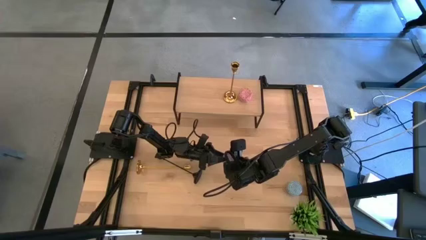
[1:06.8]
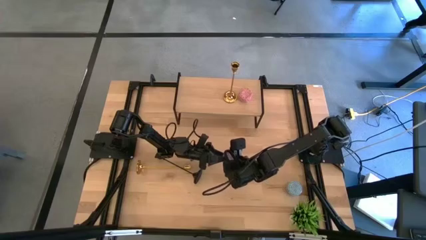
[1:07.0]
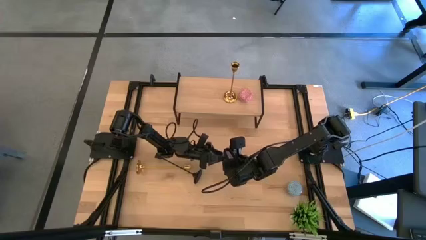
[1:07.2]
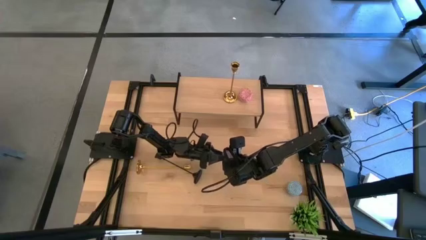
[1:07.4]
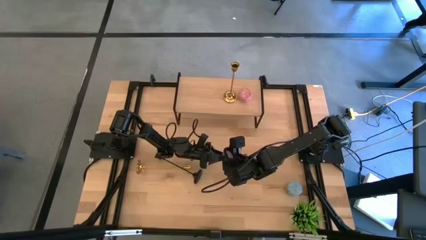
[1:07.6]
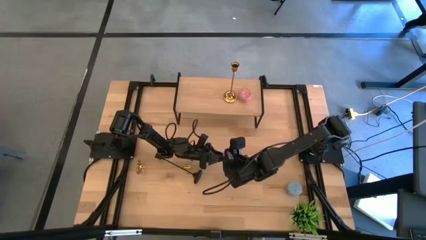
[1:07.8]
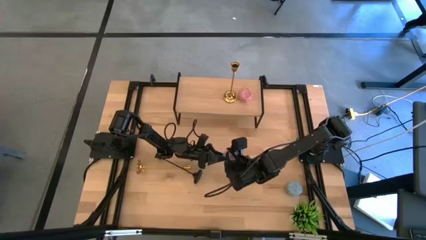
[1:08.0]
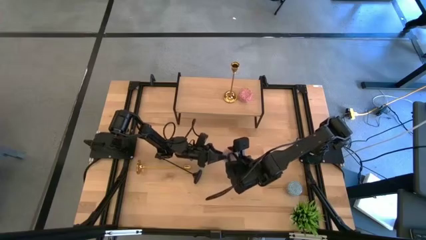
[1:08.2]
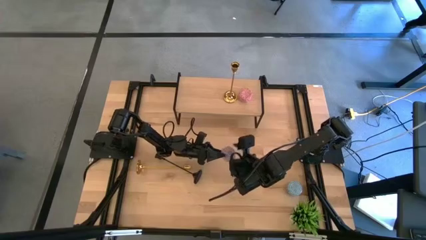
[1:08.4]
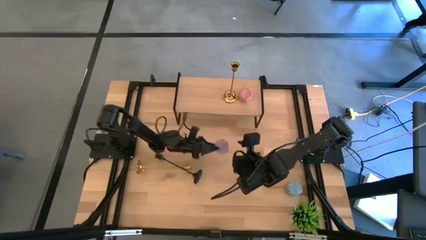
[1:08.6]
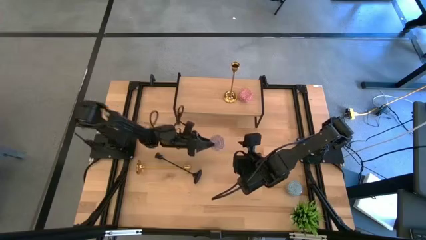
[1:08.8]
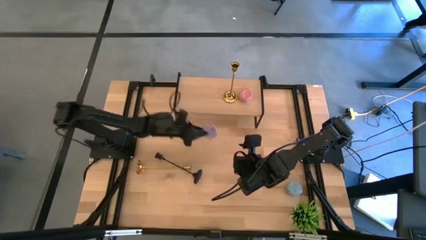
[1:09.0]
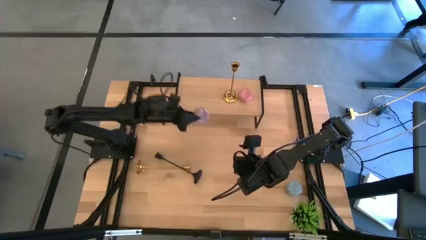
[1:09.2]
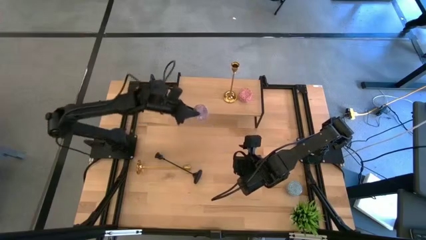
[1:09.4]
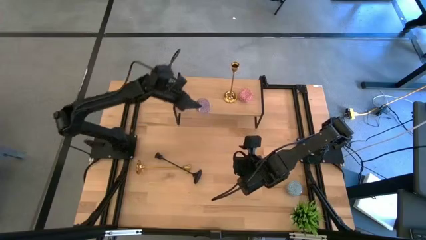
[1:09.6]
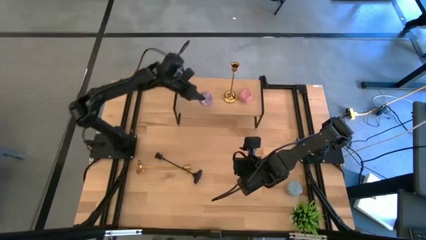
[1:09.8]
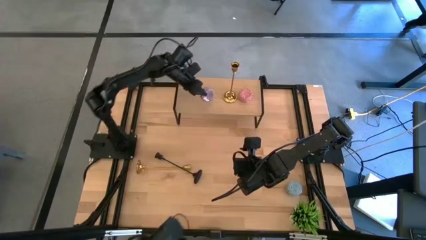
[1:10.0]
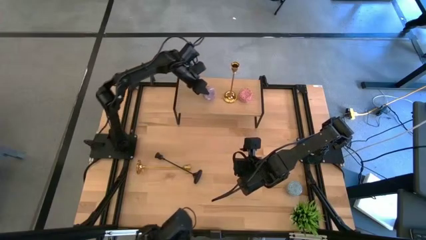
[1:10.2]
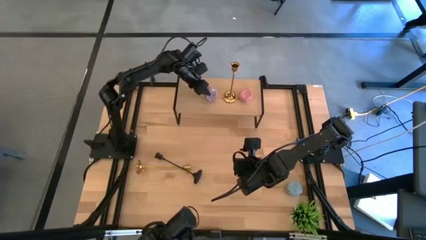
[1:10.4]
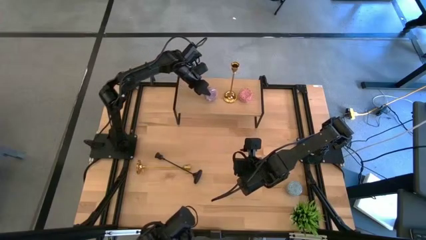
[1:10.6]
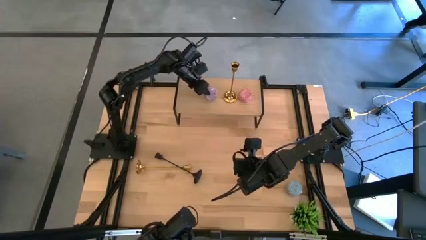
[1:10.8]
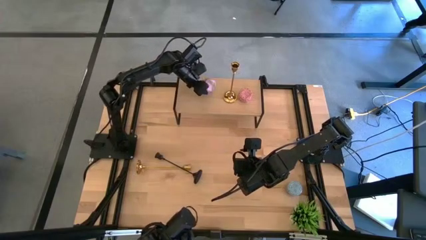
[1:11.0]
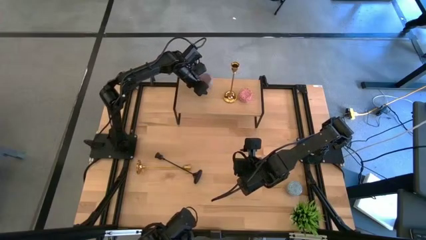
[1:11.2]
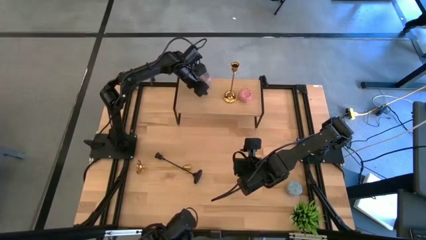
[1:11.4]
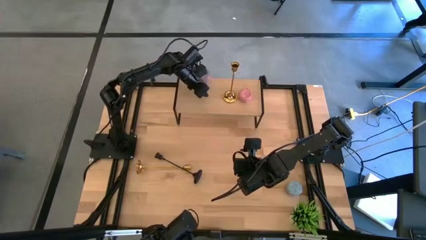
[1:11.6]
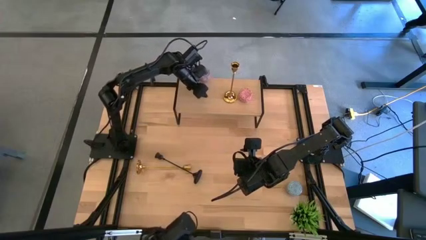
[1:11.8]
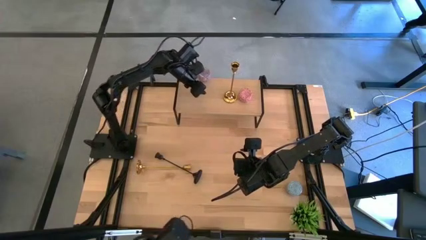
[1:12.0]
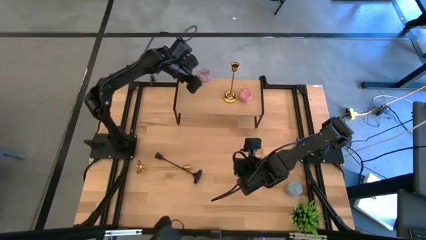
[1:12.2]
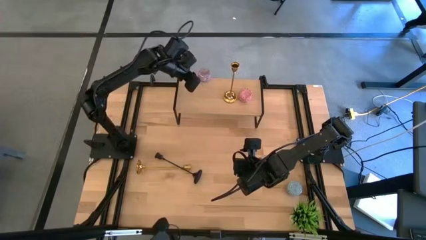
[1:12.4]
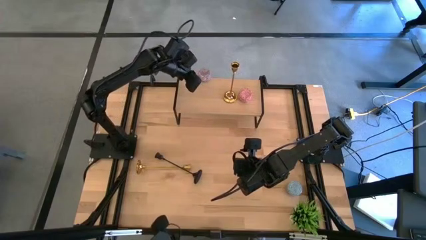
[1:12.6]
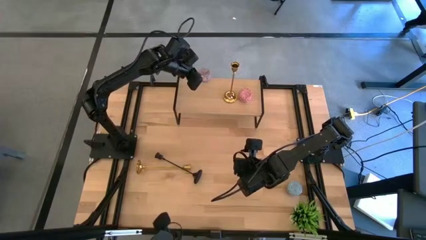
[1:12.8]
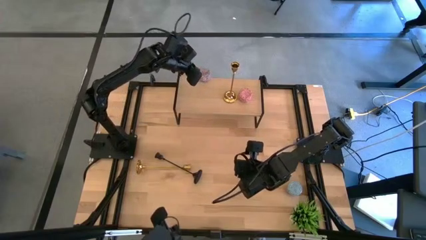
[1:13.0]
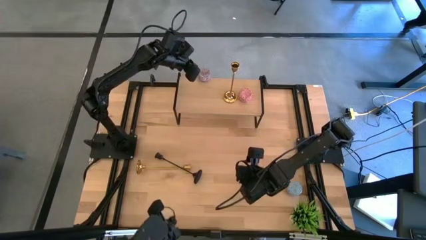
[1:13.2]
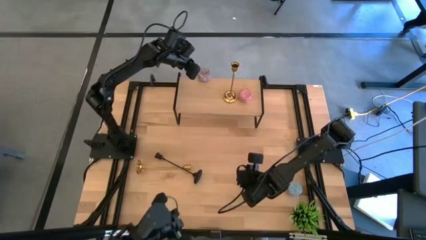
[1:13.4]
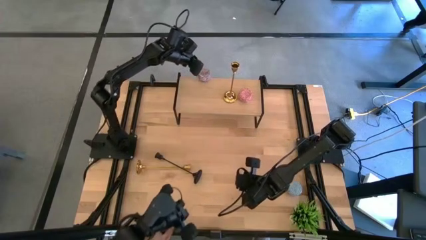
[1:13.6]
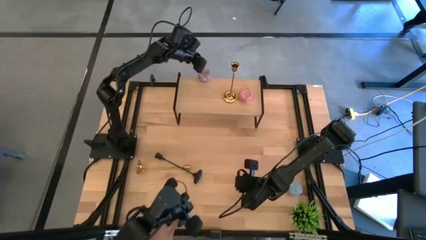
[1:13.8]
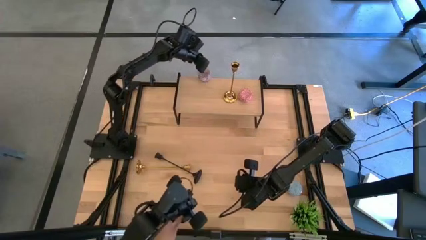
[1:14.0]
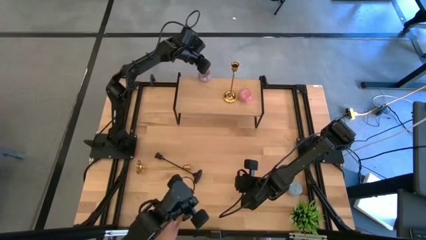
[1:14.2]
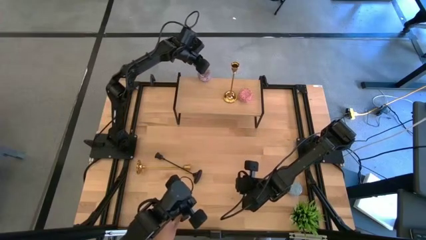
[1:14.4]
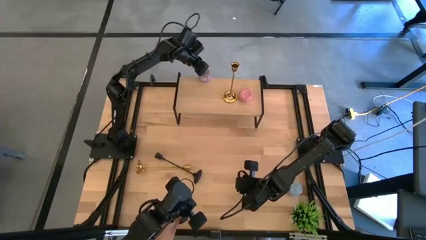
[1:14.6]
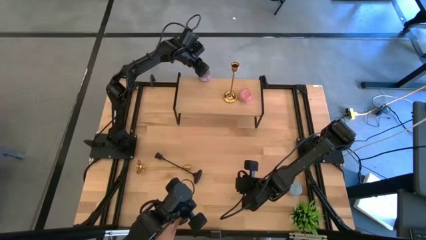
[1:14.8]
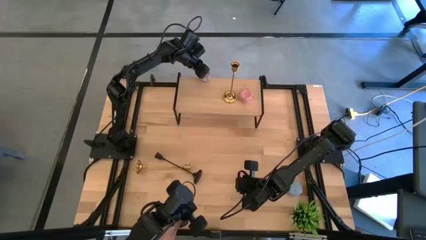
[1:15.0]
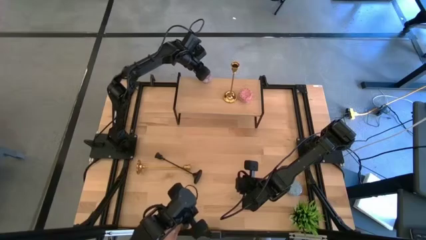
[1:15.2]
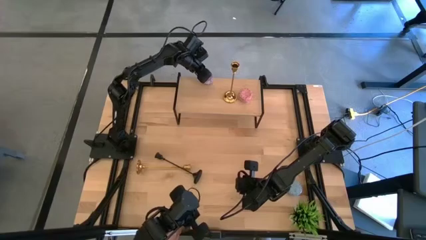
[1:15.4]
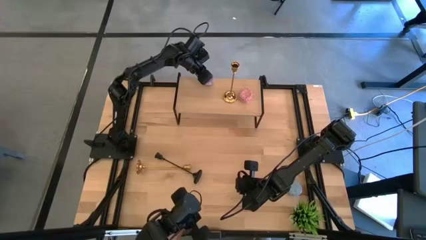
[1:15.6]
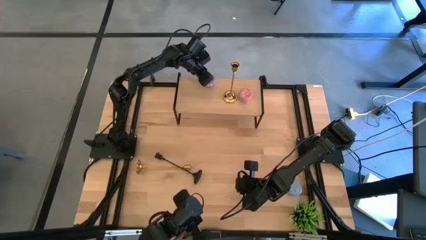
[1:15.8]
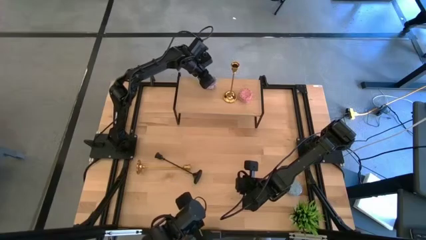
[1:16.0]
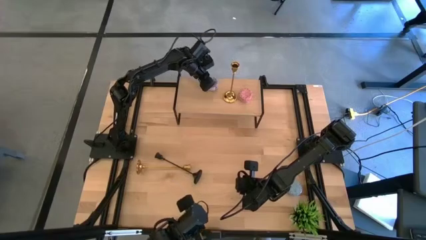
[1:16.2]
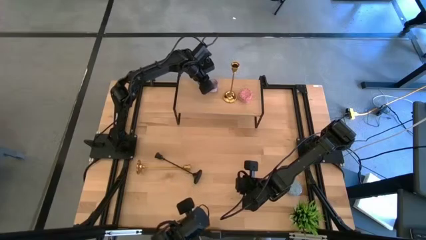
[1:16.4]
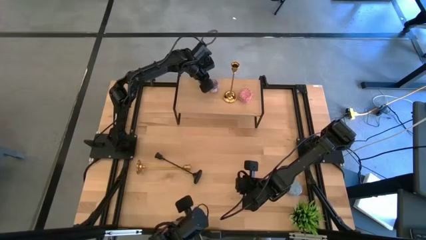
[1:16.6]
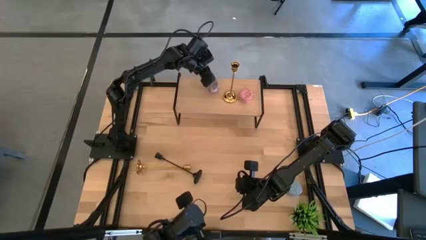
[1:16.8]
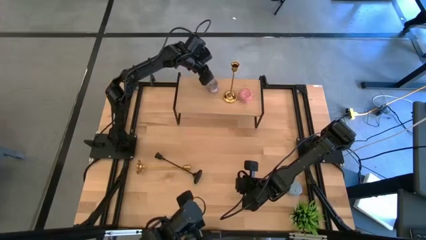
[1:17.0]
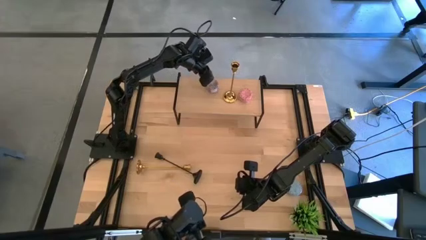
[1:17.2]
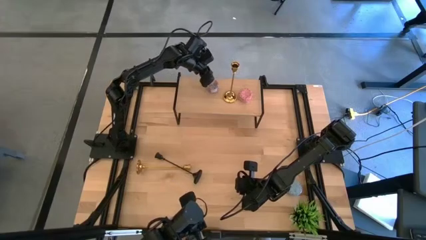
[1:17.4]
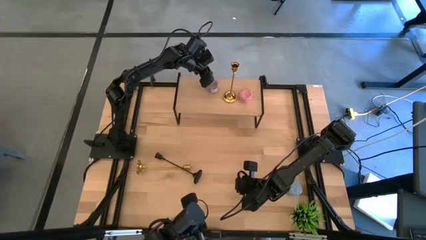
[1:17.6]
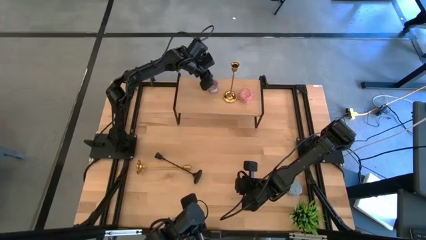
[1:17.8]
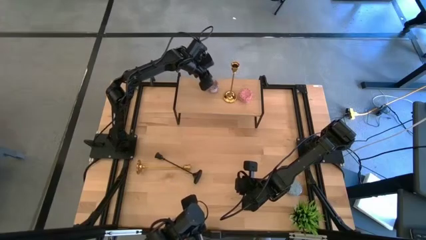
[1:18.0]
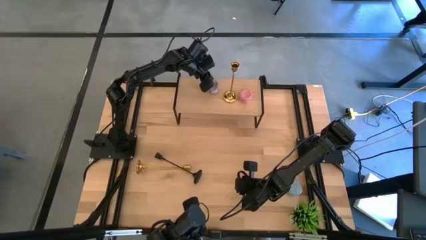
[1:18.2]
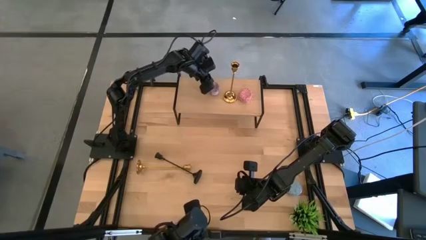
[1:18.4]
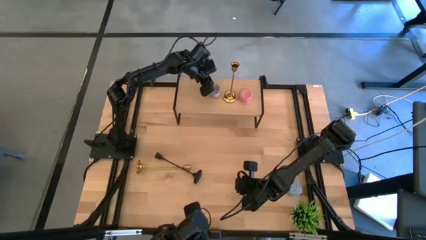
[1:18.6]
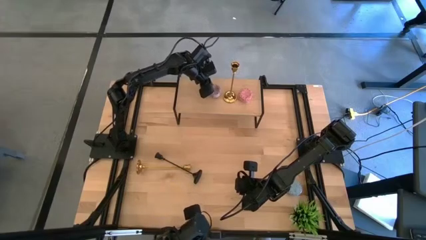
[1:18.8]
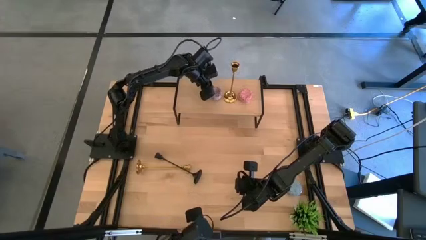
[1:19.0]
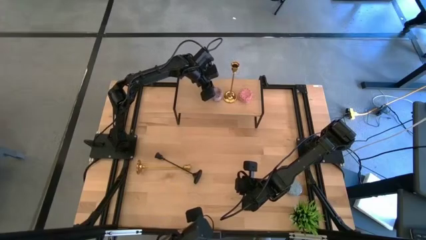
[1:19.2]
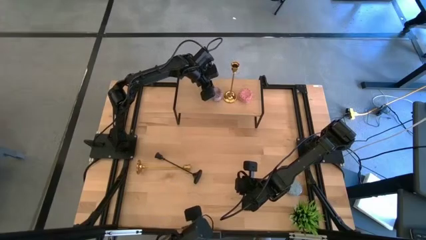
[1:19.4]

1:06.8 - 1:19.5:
Task: Pick & Place candle stick holders
Put the red scented candle on the shelf

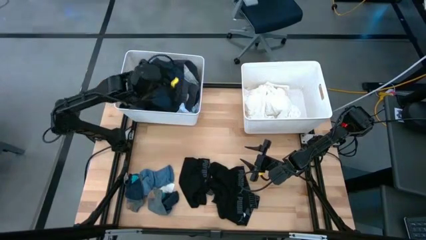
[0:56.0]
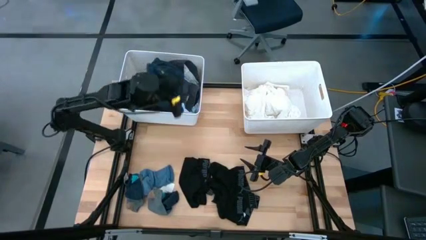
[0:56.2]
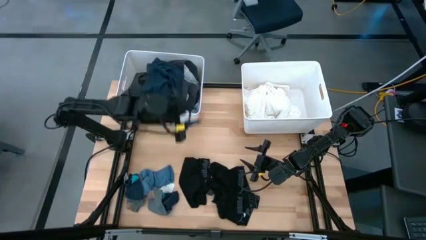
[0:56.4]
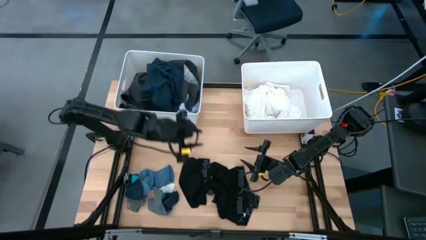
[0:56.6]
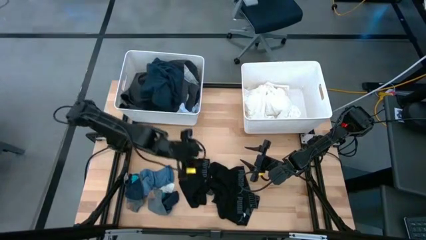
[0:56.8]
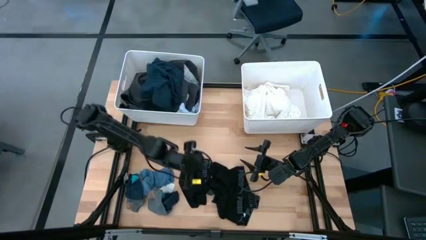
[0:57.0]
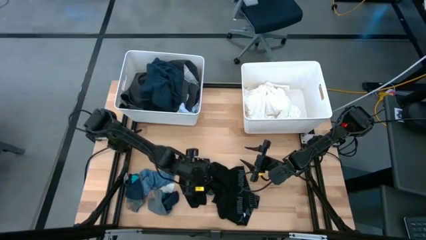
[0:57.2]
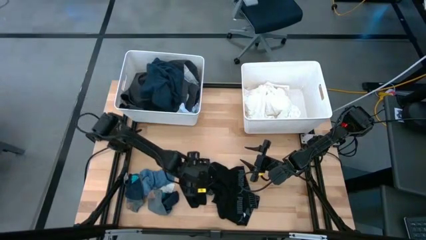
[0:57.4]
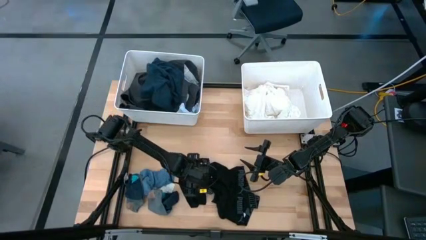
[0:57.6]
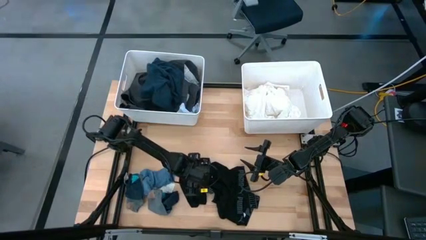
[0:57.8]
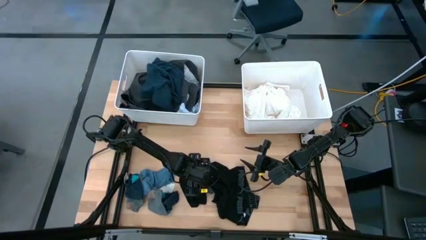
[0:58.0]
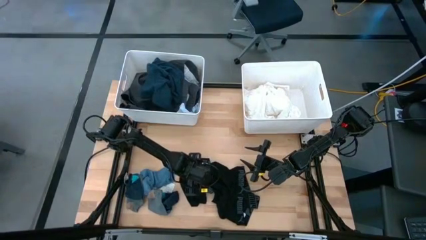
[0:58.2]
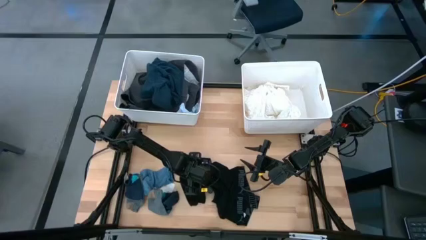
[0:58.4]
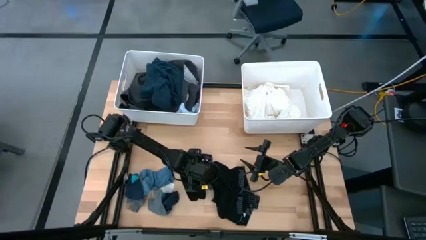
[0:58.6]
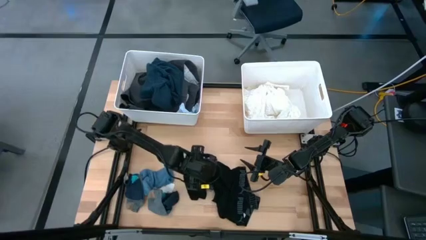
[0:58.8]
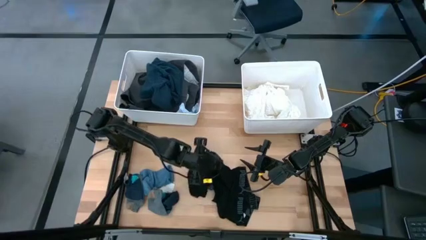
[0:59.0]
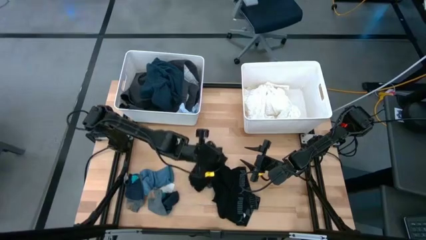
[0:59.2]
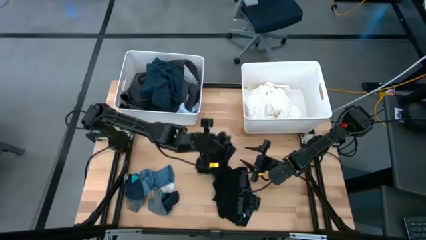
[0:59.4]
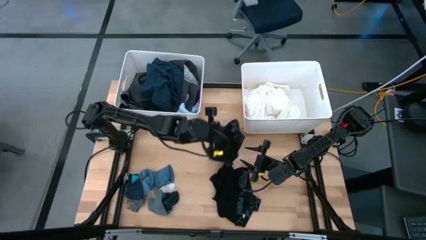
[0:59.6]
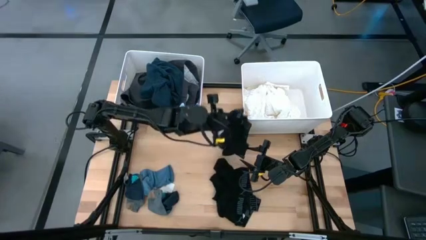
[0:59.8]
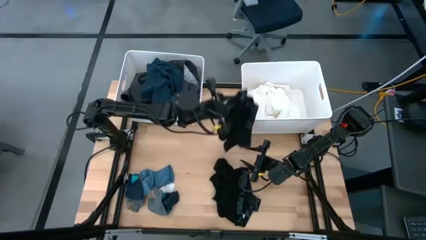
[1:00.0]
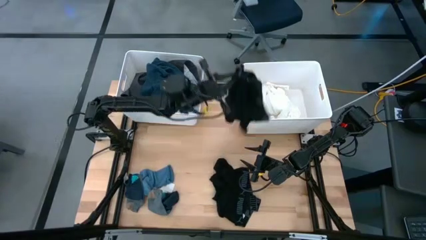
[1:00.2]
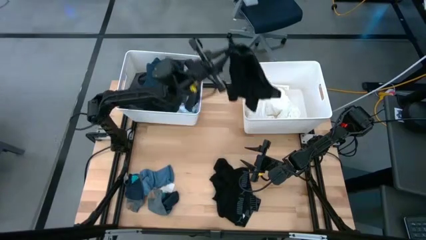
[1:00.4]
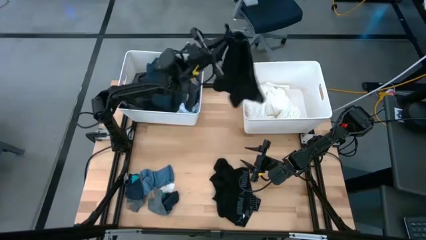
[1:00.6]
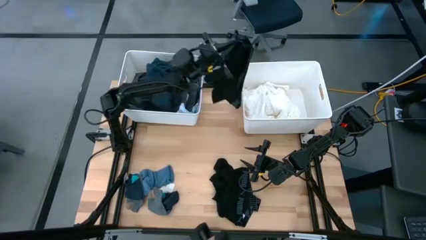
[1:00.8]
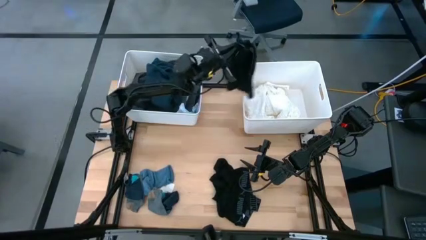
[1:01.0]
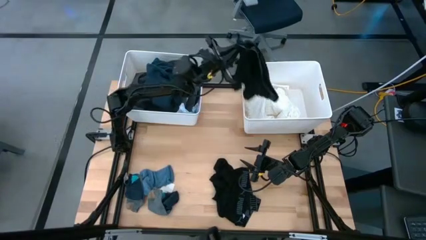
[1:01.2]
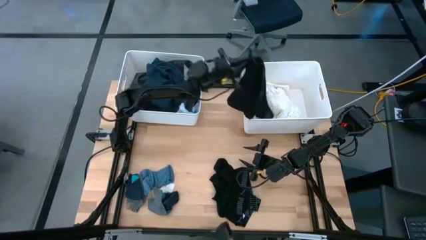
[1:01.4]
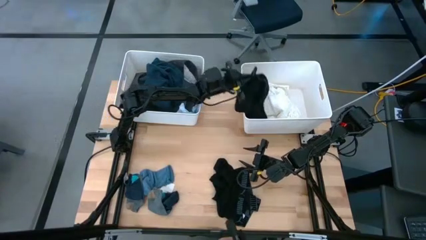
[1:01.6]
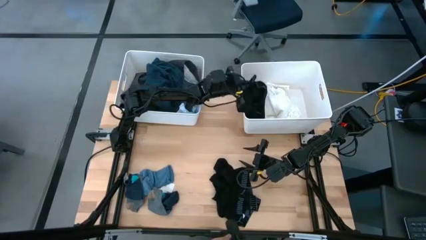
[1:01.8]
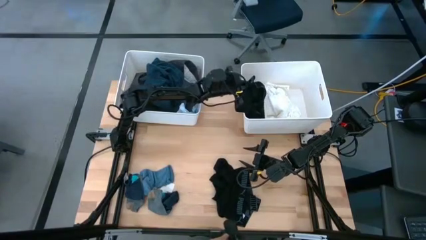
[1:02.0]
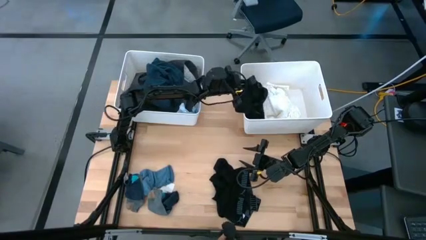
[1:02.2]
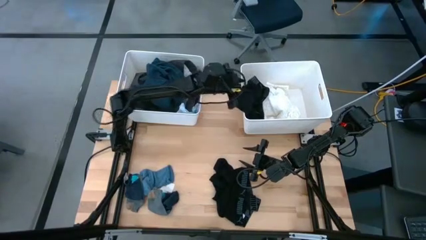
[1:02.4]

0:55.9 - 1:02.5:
Task: Sort clothes
Put the left black boxer into the right white laundry bin
